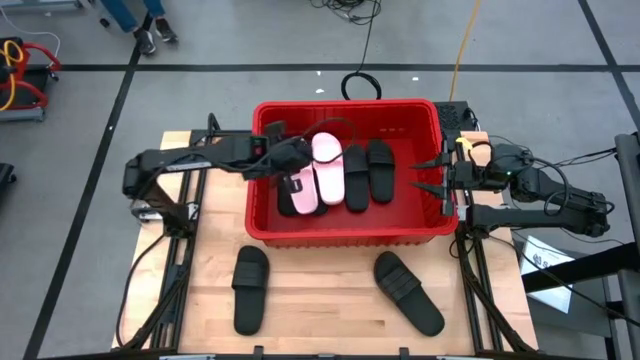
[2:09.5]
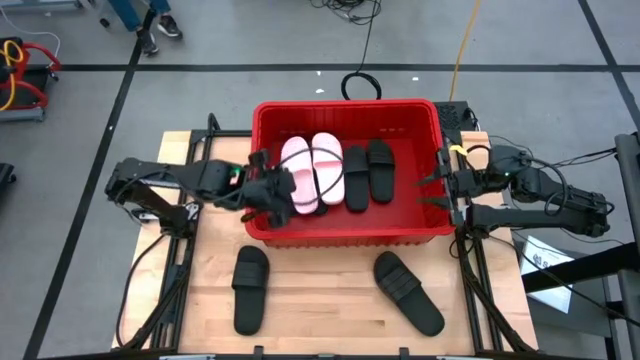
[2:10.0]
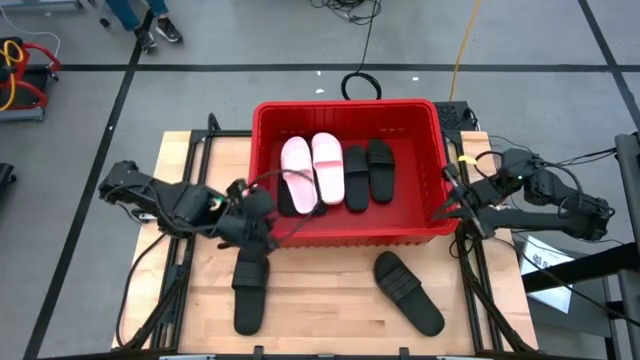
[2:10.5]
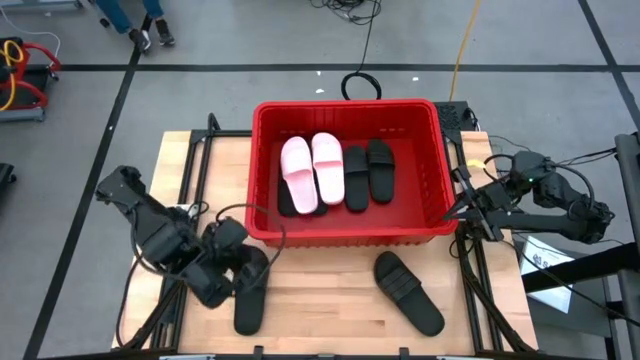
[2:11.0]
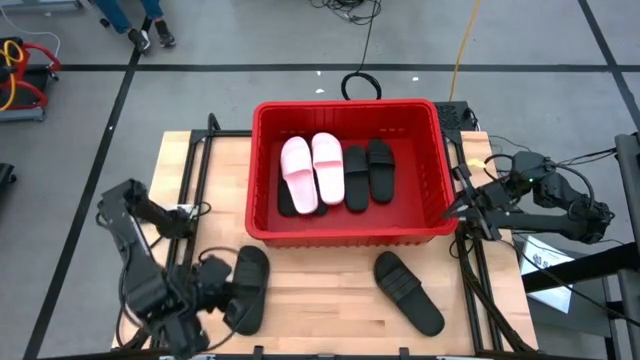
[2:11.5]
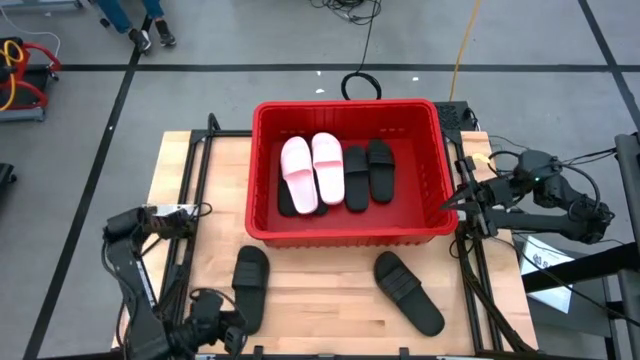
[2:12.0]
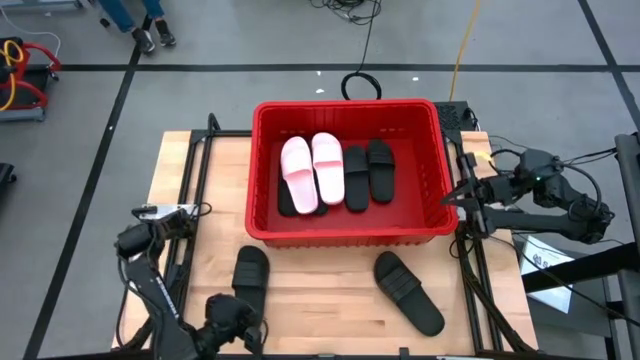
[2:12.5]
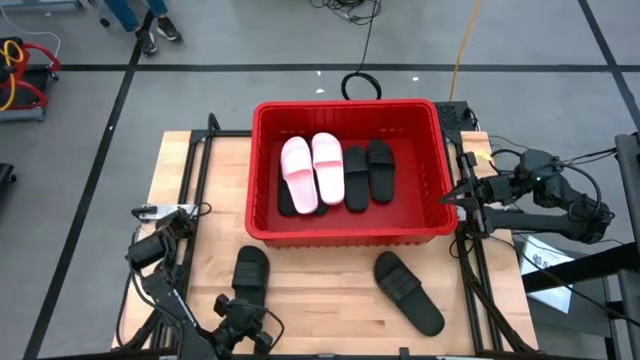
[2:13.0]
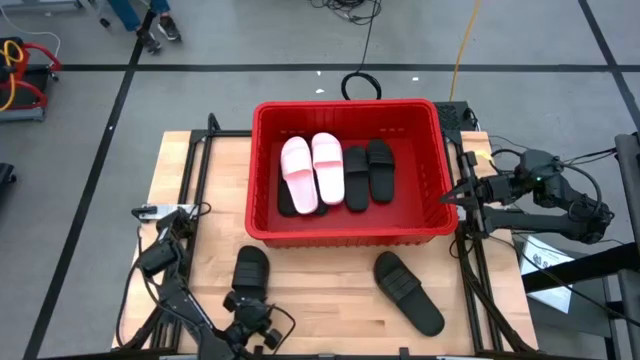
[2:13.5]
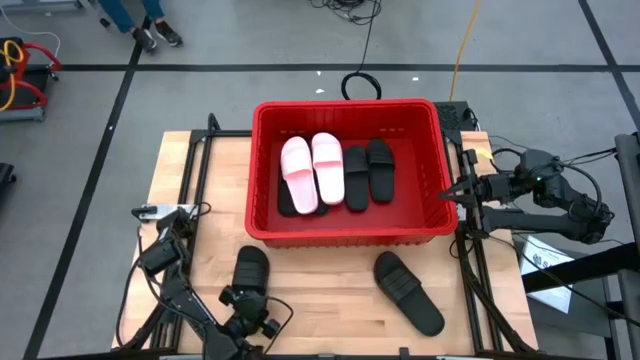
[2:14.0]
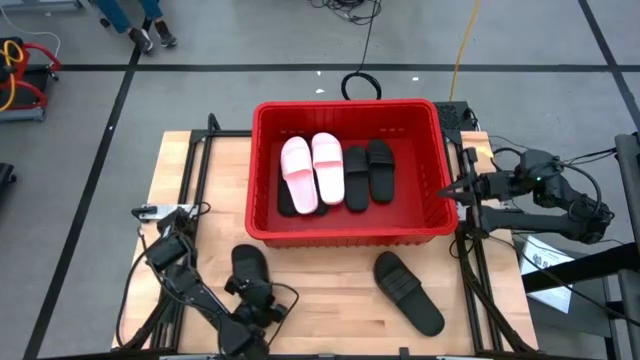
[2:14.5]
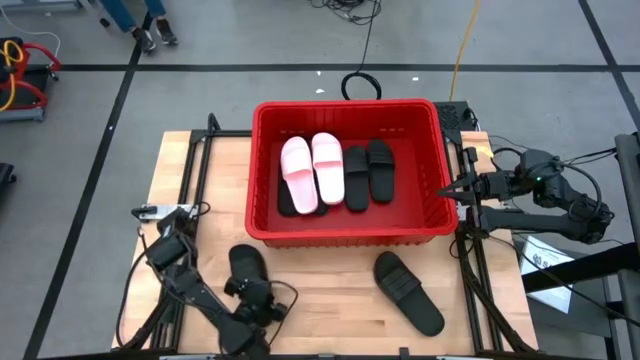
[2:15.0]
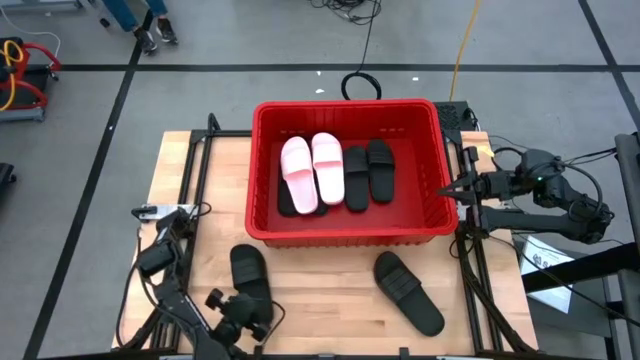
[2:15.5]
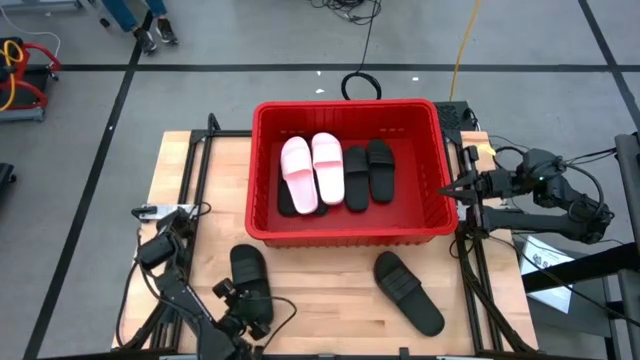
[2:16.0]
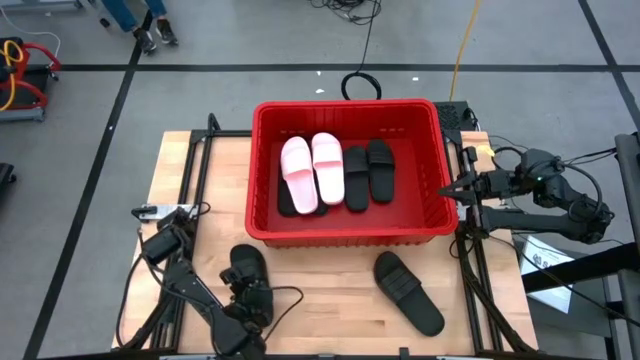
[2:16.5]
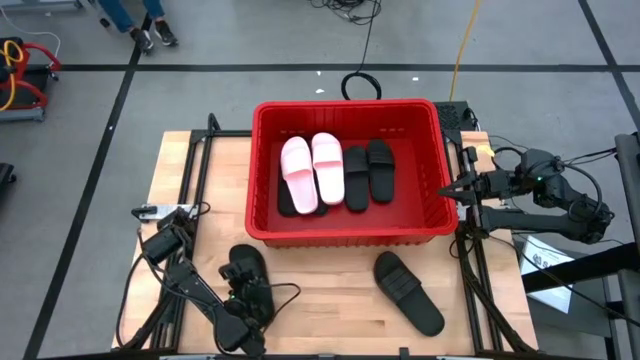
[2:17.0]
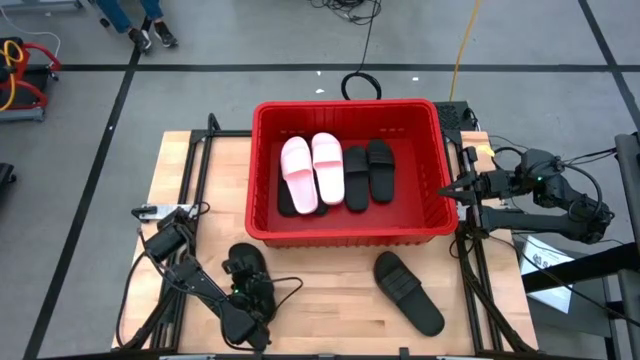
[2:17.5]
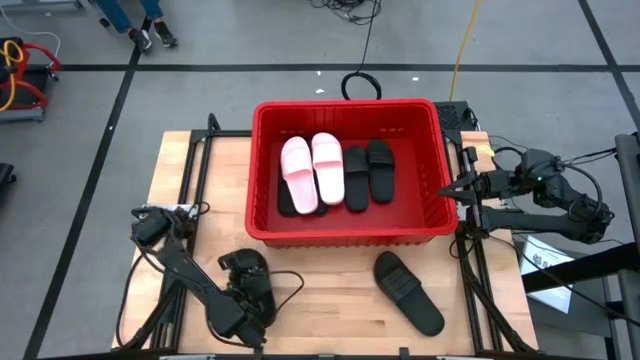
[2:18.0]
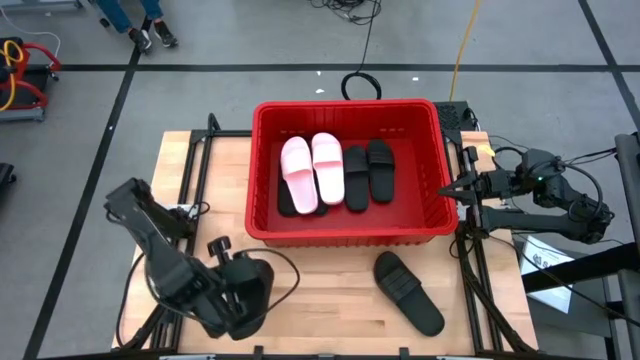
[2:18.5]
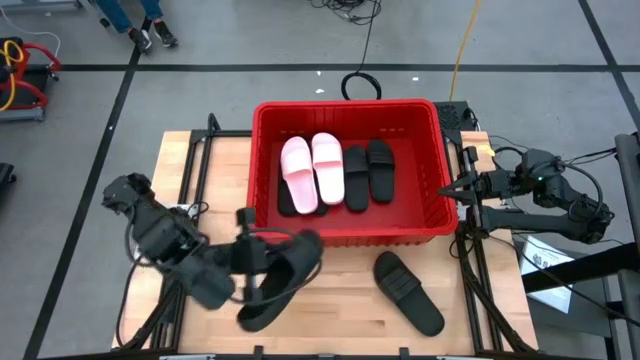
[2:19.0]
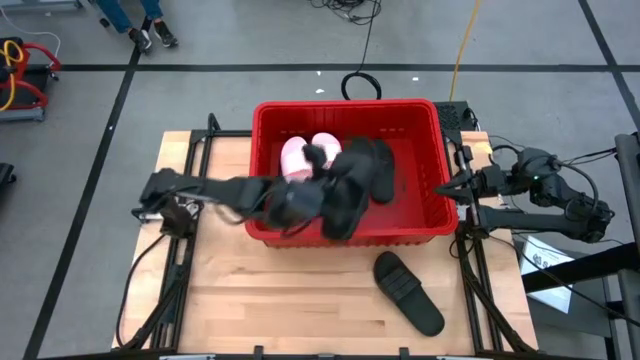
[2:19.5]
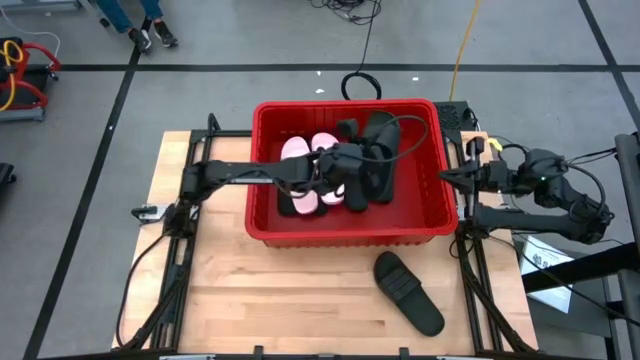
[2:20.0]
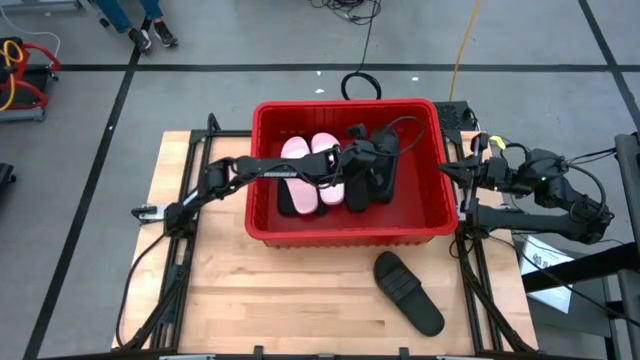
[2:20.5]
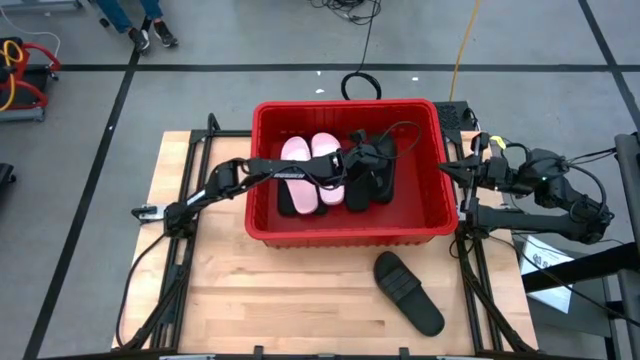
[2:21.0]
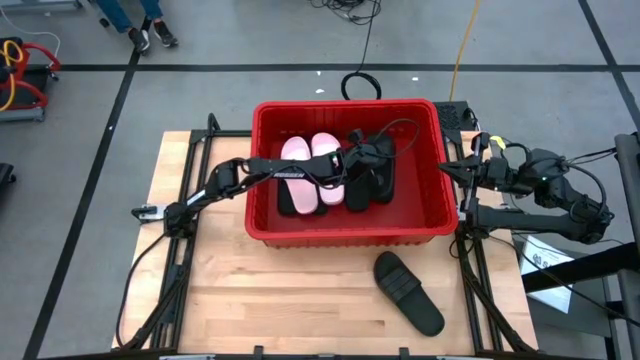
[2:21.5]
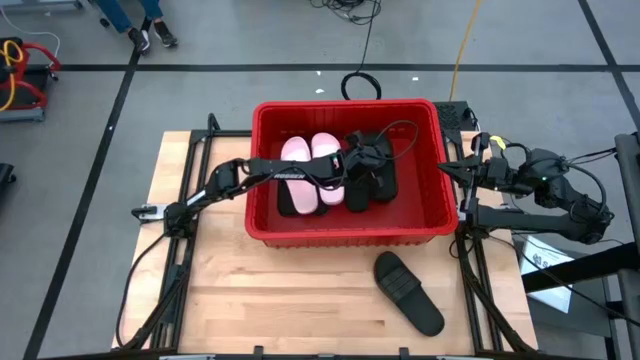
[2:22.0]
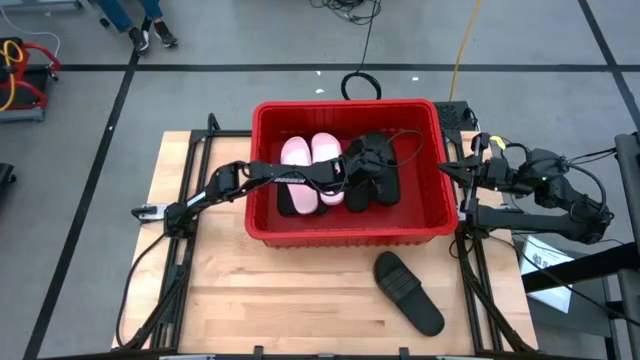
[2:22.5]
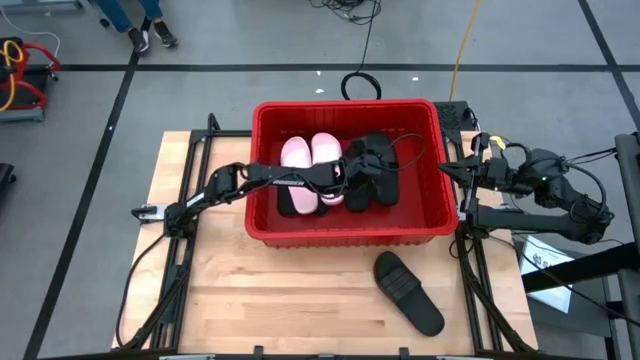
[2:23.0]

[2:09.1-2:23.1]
Task: Pick and place slides into bin
Put the black slide into the red bin

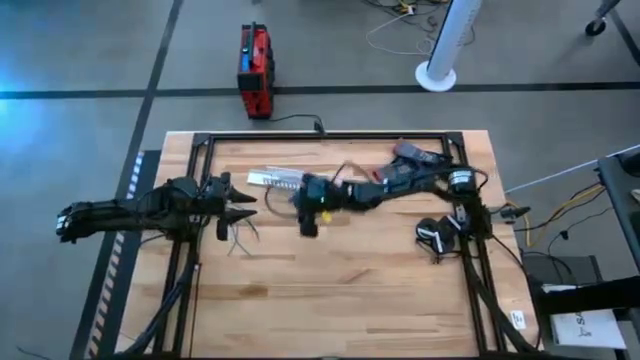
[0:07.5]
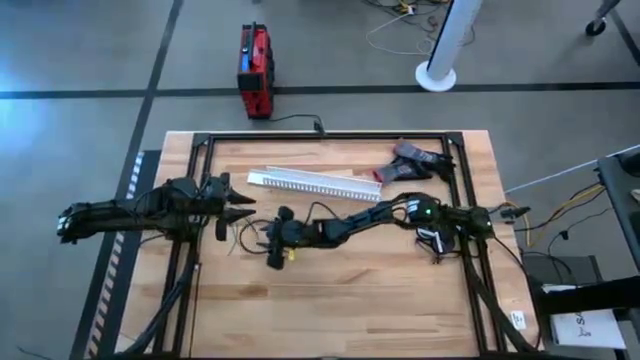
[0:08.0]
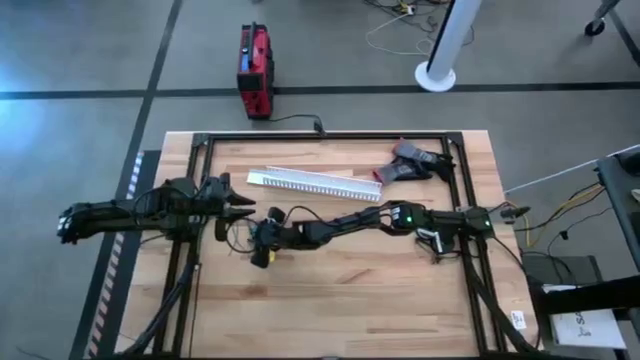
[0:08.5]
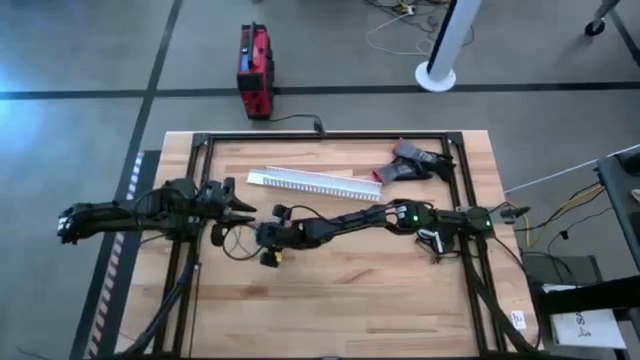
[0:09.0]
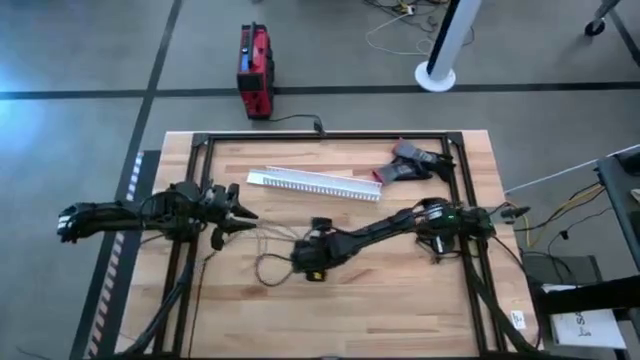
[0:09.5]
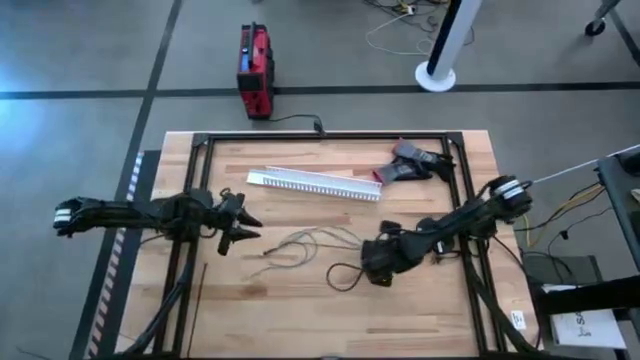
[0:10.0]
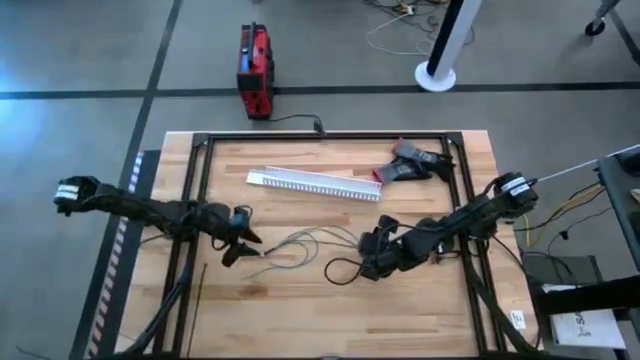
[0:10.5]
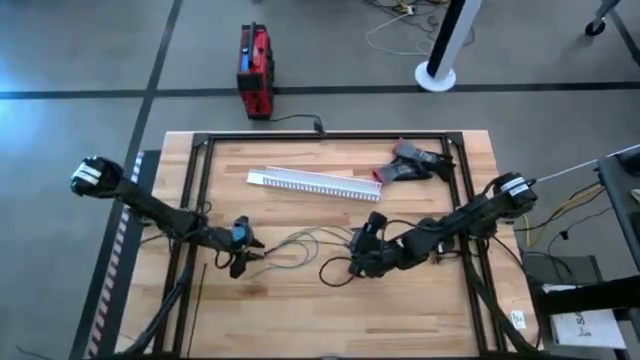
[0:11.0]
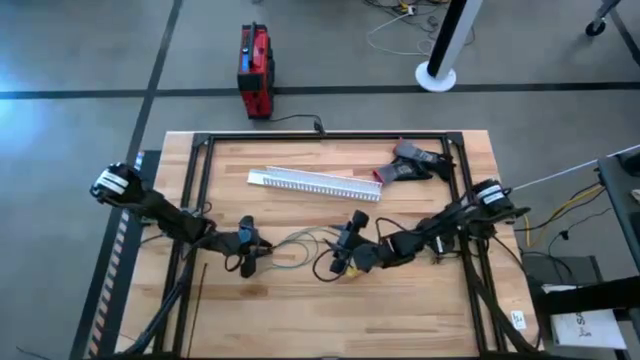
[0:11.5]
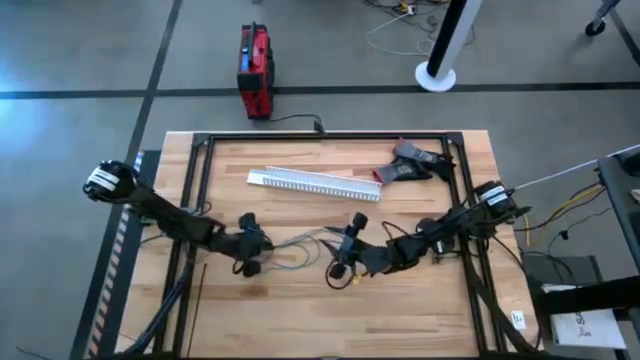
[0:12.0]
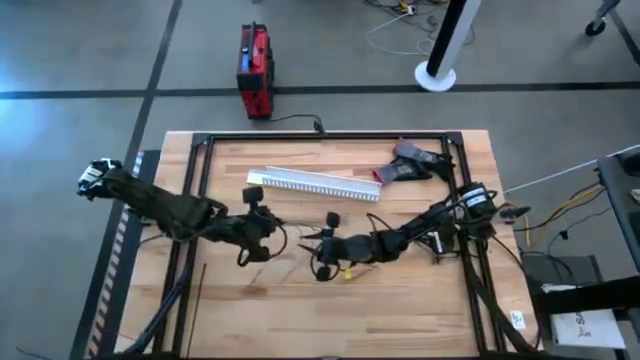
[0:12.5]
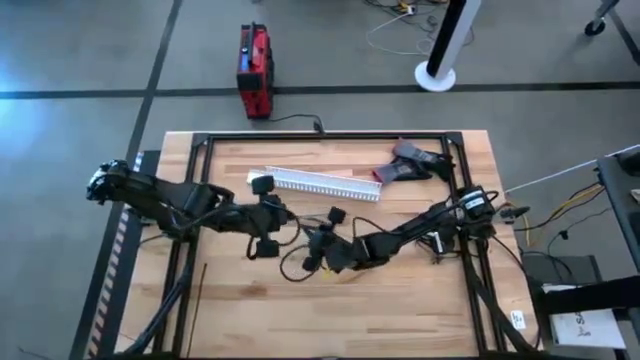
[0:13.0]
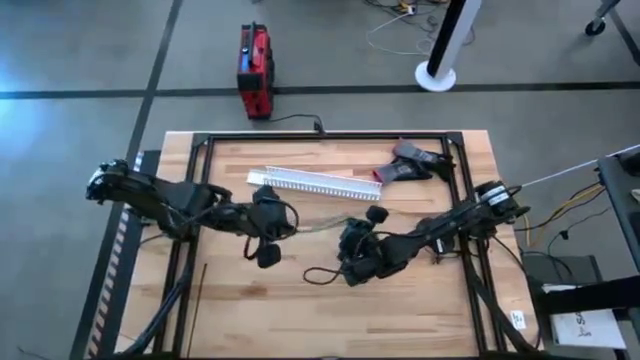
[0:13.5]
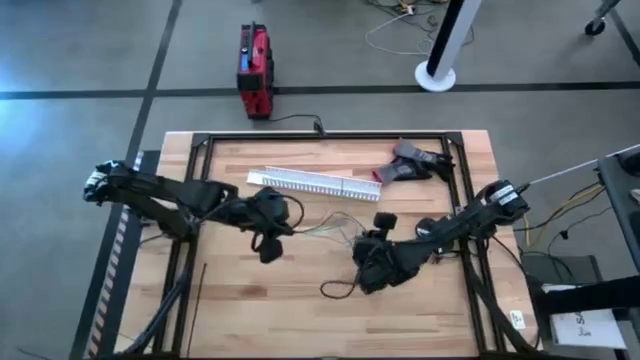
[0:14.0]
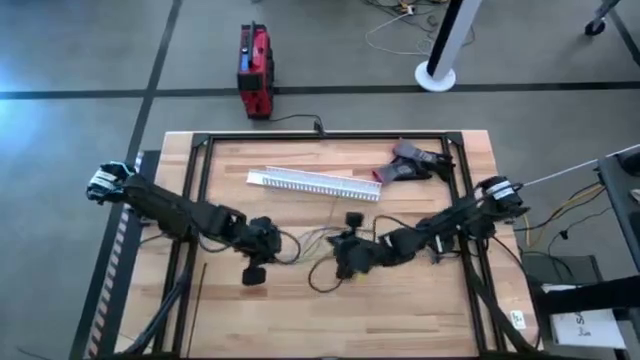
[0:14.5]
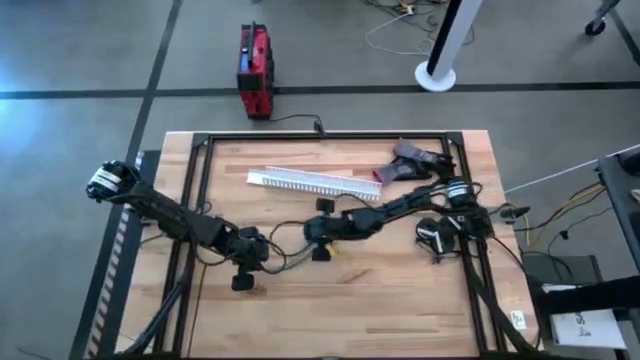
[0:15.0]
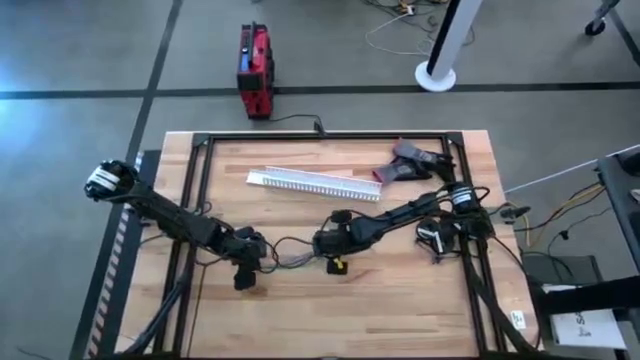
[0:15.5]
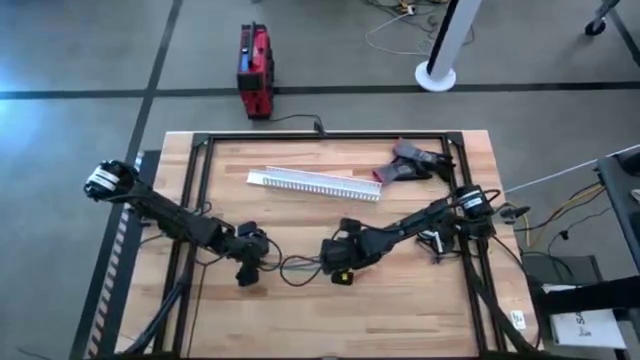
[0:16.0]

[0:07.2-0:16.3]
Task: Ziptie cables
Move the cable wires from middle left to the center of the table
